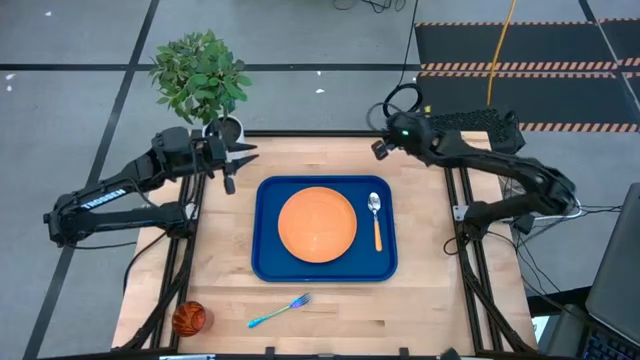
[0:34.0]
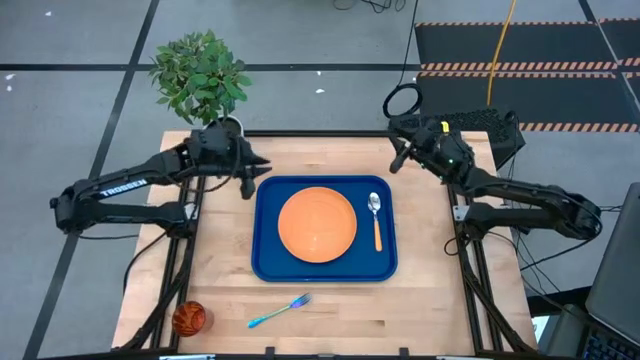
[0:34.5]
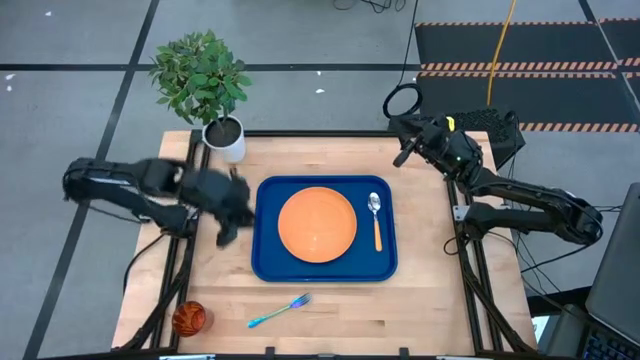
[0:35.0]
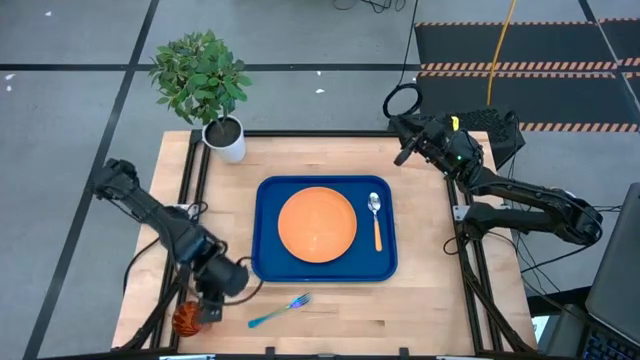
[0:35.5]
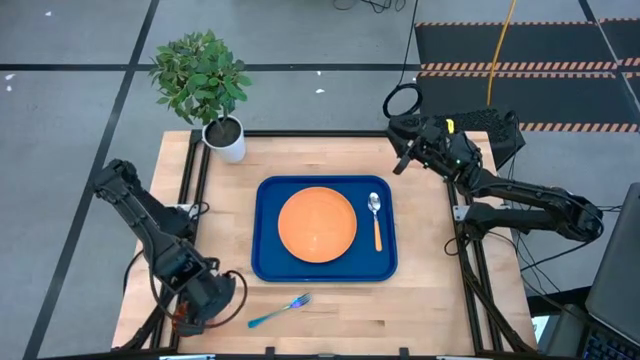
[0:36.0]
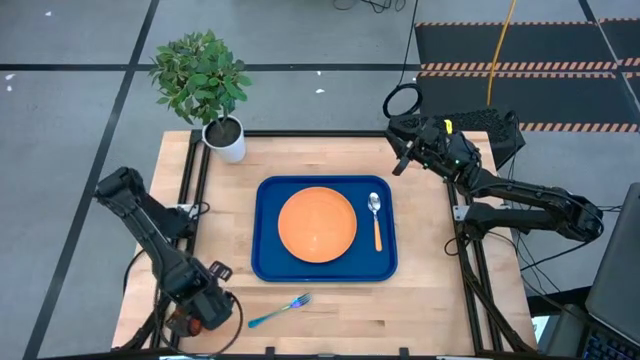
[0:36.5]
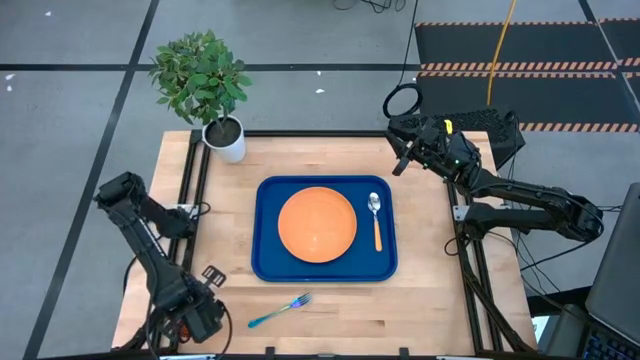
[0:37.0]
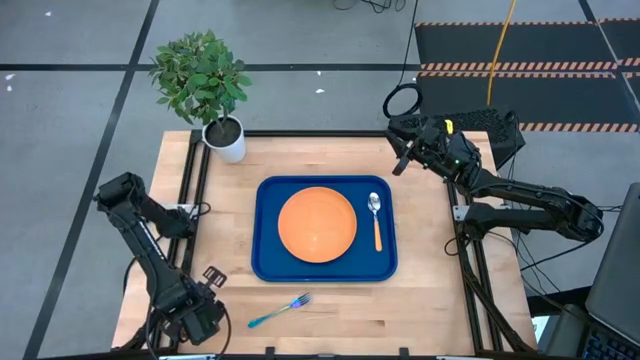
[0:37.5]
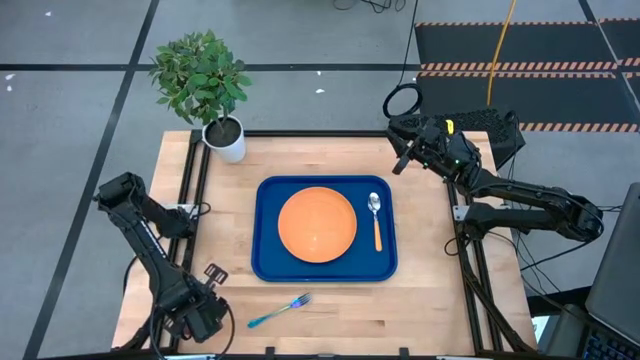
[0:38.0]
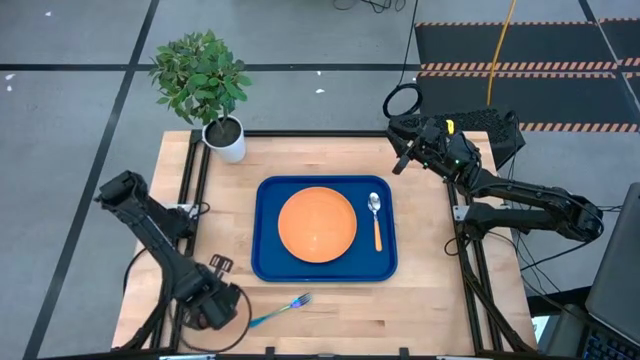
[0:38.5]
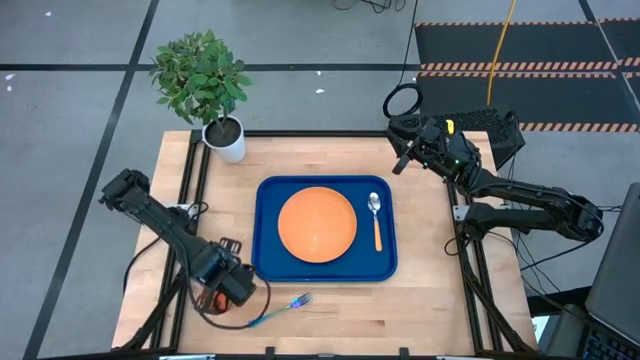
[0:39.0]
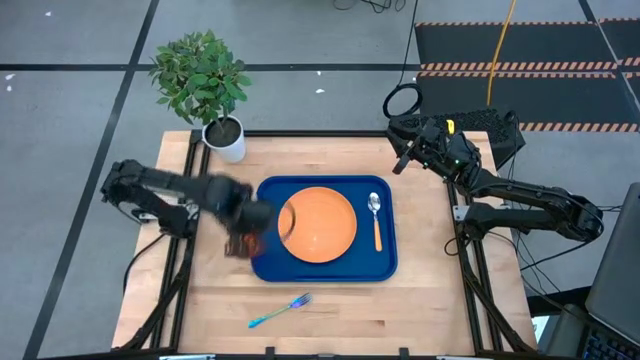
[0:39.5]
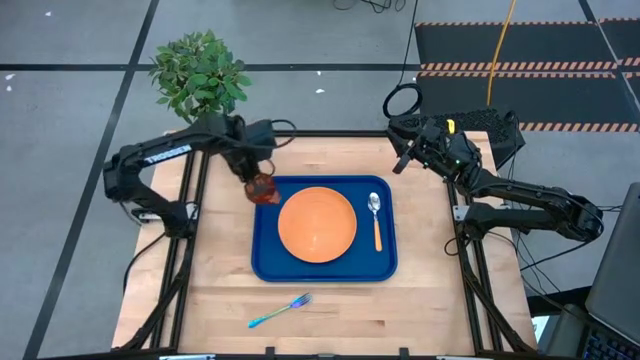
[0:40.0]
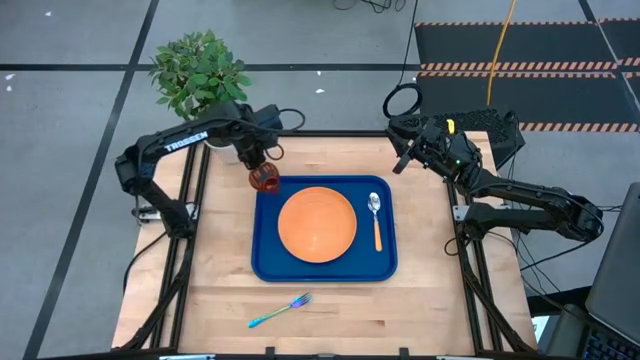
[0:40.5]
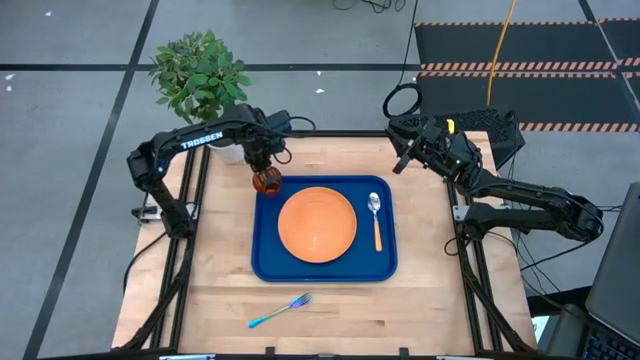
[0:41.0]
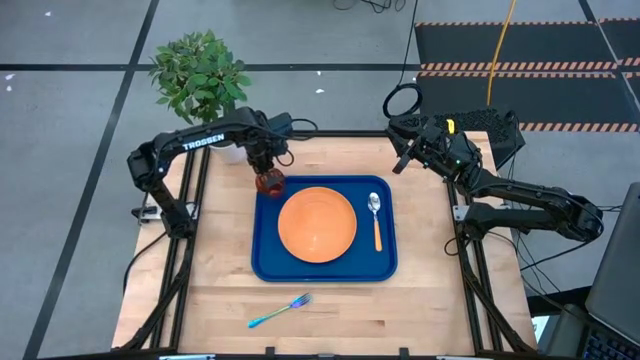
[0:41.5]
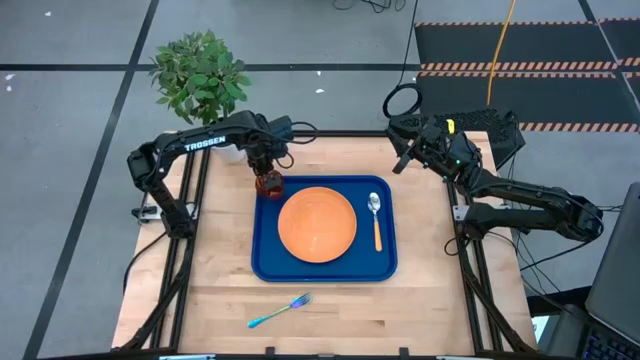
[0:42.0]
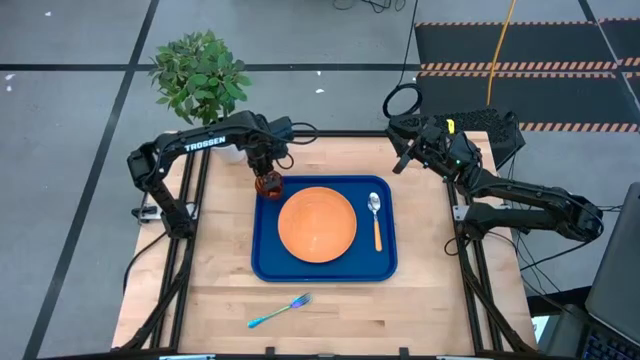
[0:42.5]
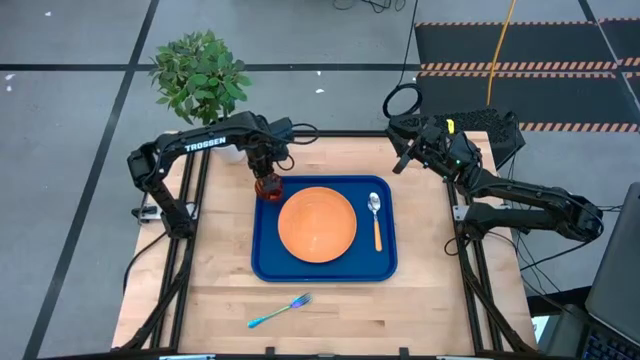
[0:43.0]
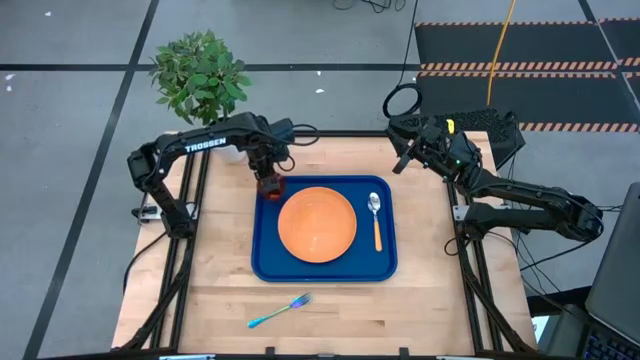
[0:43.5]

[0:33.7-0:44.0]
Task: Pick and place plate/cup/fork/spoon on tray
Put the cup on the serving tray to the top left of the plate

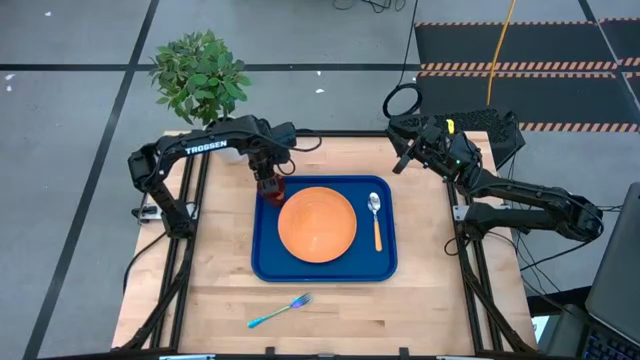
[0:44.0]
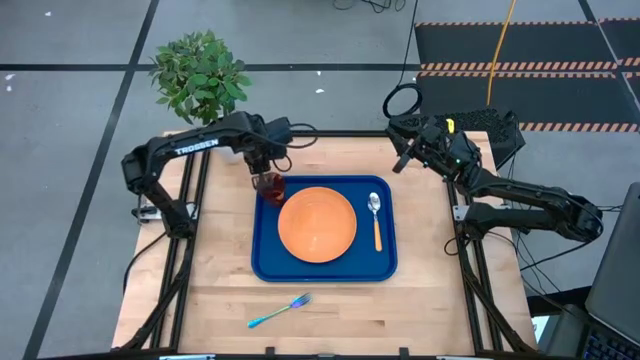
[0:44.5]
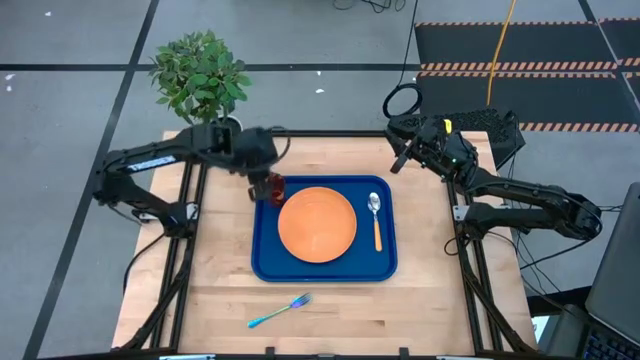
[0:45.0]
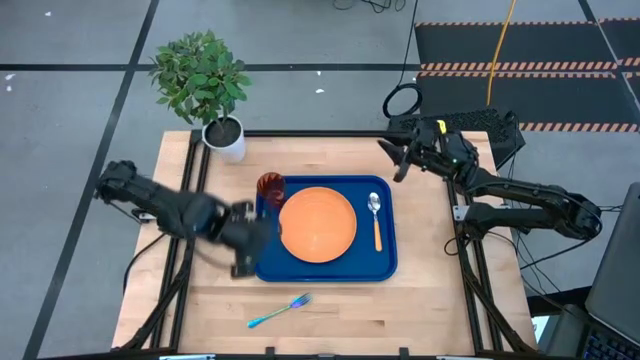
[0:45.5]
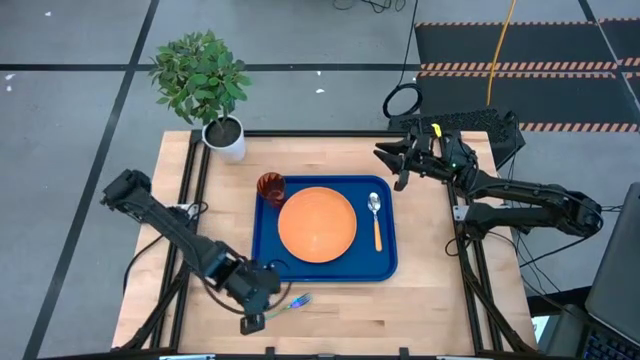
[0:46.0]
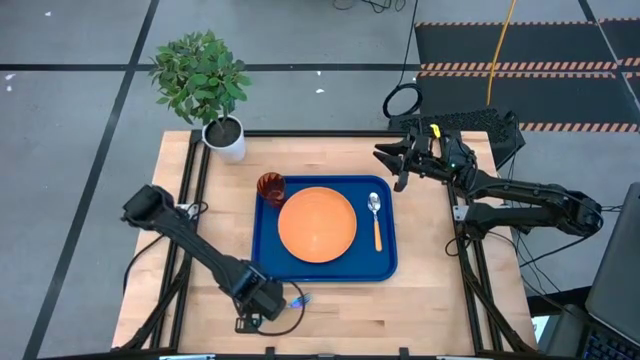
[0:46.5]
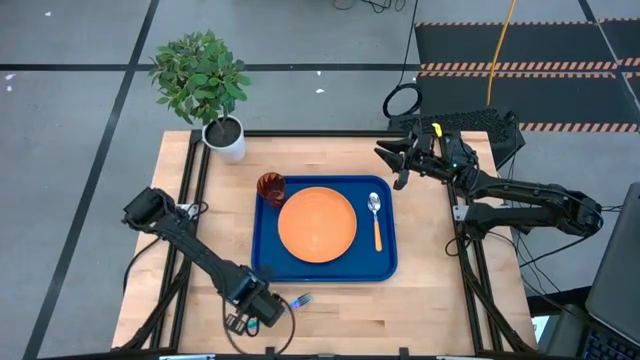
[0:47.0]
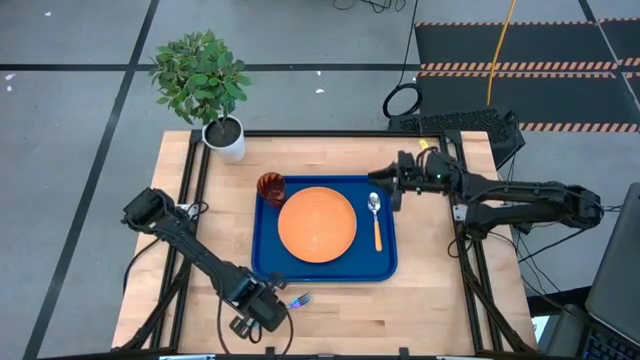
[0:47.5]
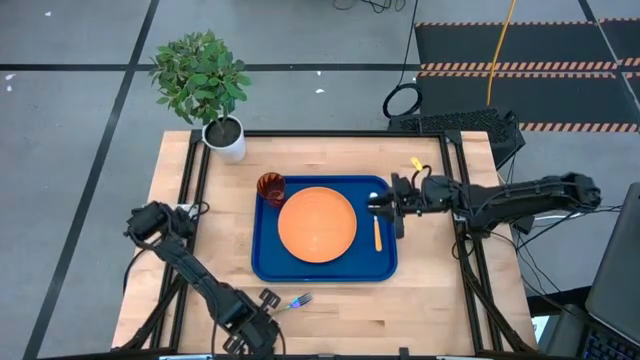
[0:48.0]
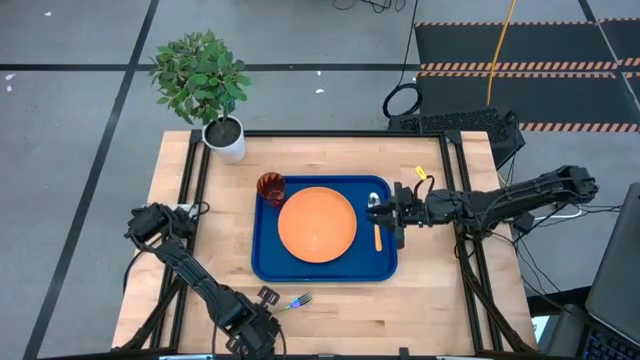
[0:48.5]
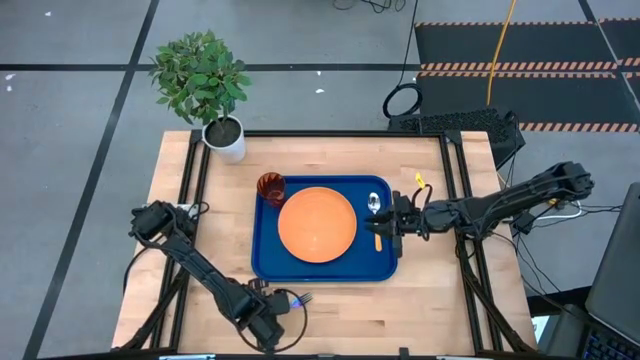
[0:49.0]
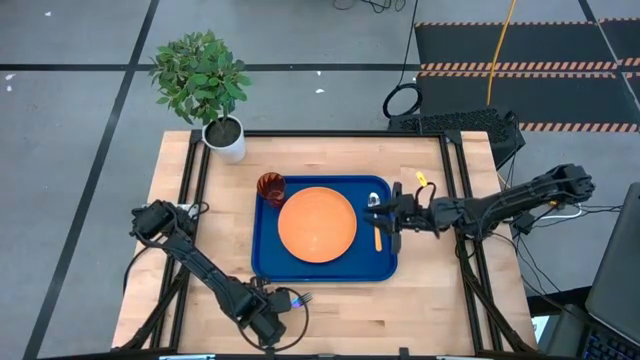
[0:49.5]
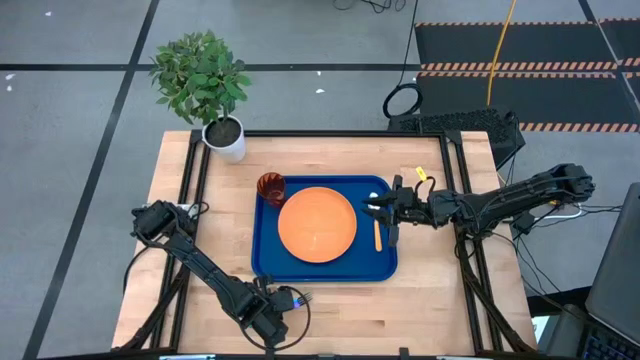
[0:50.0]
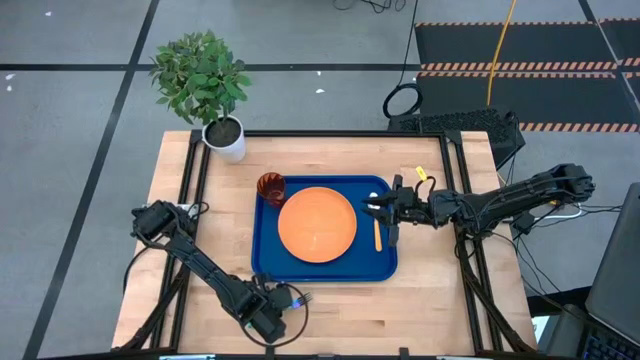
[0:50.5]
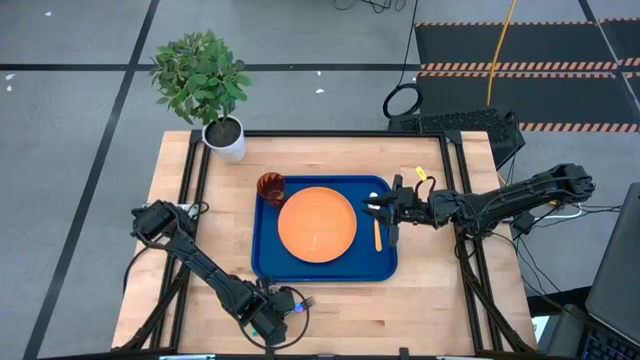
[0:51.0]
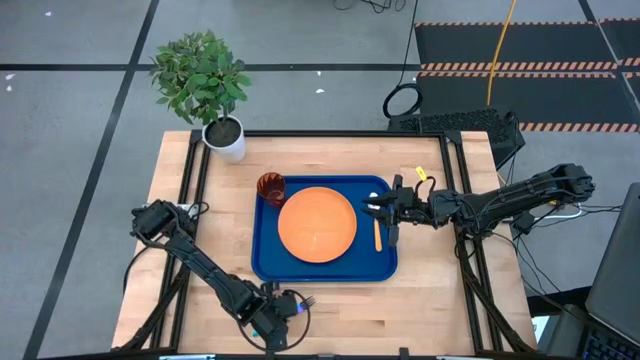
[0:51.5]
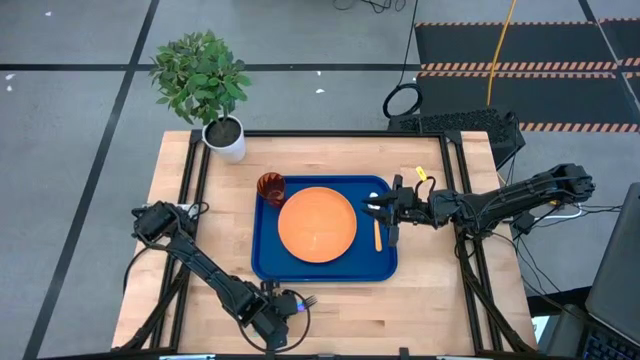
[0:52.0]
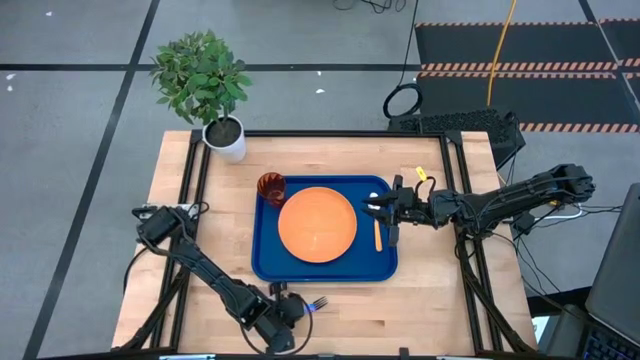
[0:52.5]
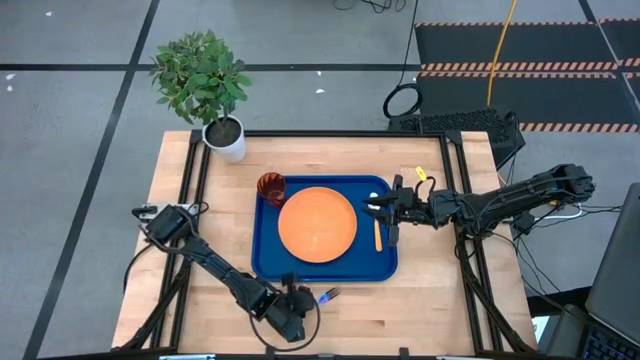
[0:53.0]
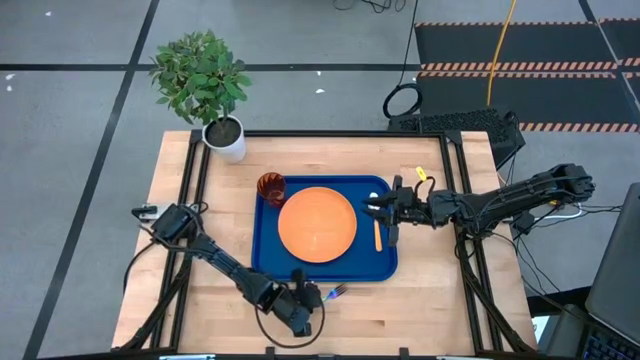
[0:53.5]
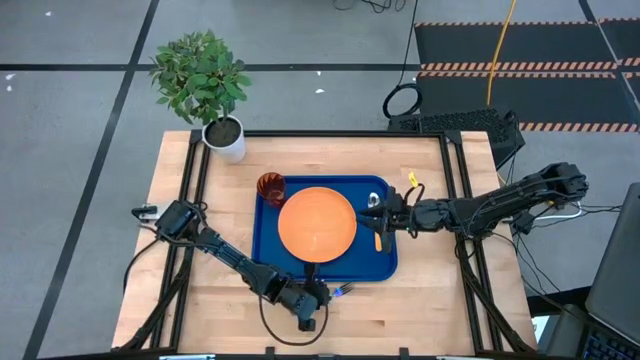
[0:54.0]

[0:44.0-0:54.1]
Put the fork on the serving tray to the right of the plate

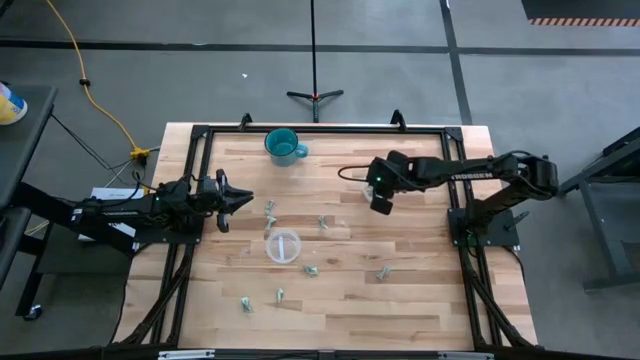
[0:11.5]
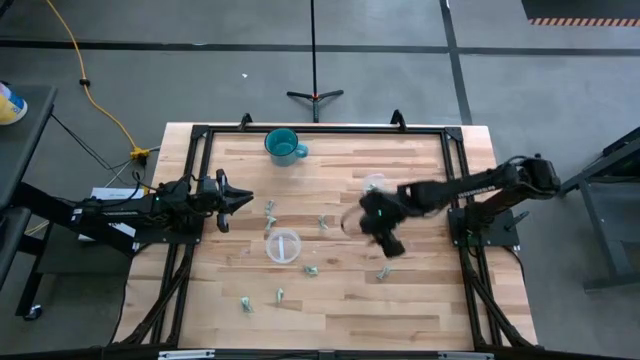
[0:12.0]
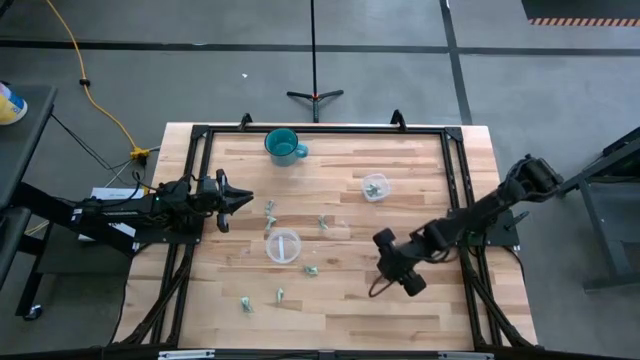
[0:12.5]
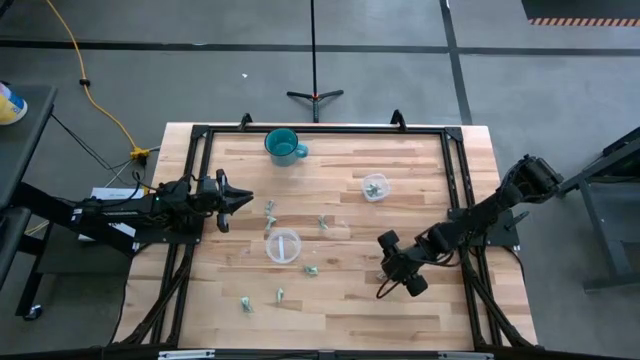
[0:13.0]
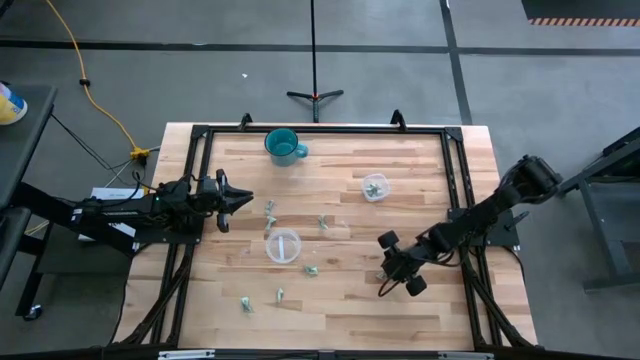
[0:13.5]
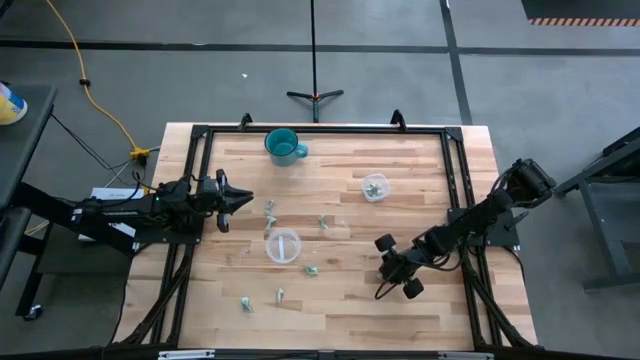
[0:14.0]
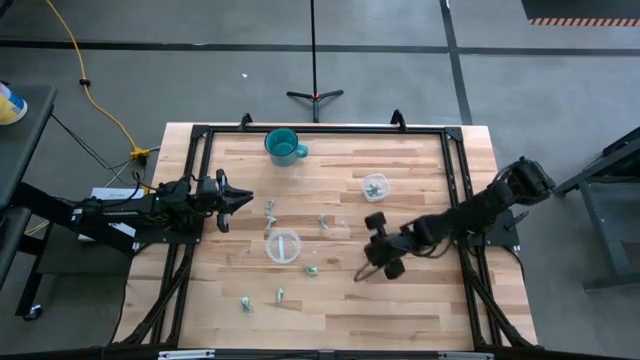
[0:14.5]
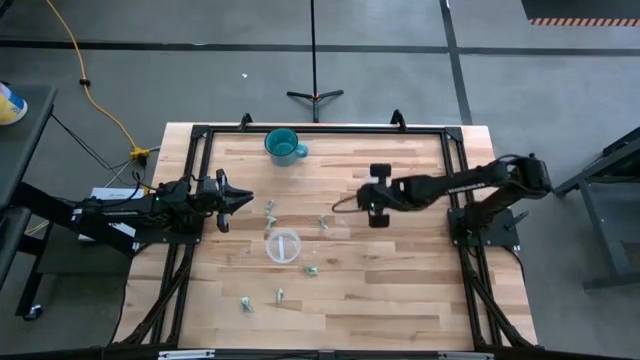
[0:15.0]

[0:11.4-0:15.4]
Task: Pick and place items into bin
Put the stevia packet into the right transparent bin
